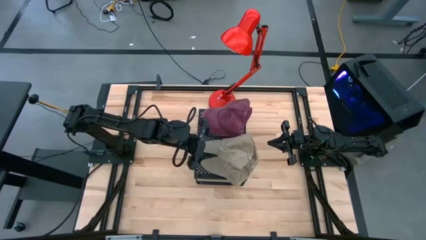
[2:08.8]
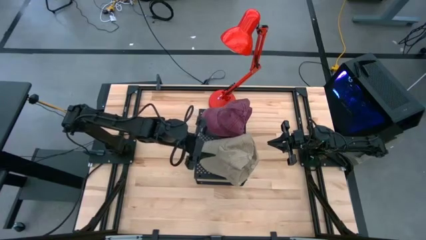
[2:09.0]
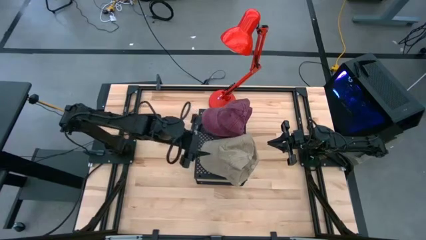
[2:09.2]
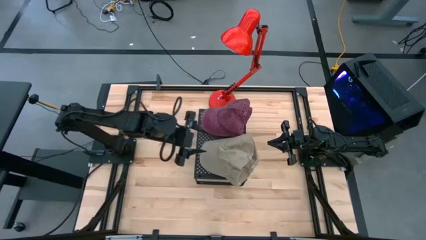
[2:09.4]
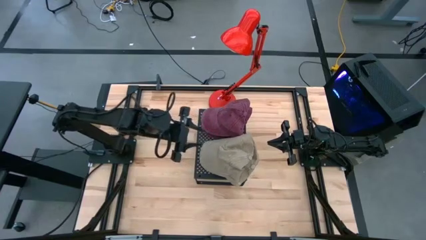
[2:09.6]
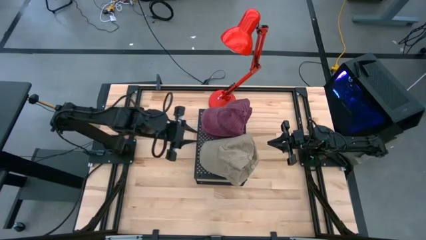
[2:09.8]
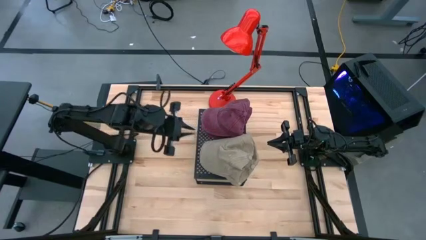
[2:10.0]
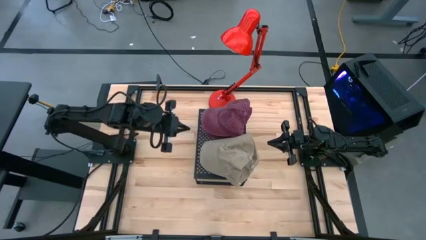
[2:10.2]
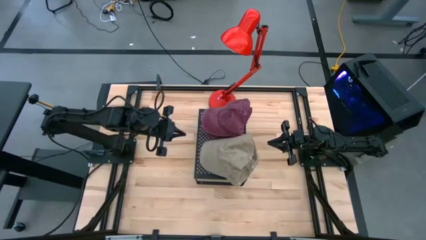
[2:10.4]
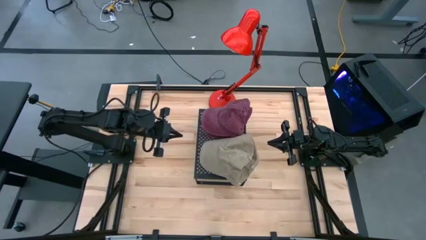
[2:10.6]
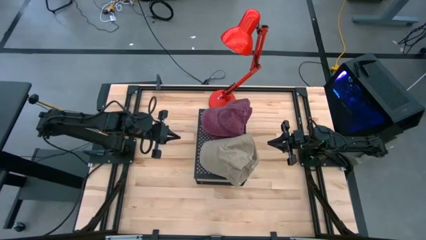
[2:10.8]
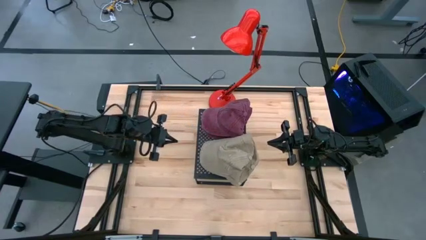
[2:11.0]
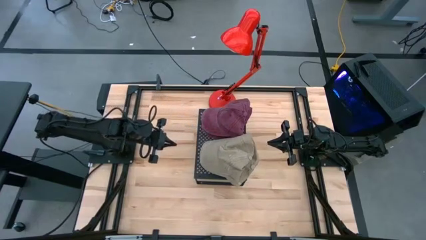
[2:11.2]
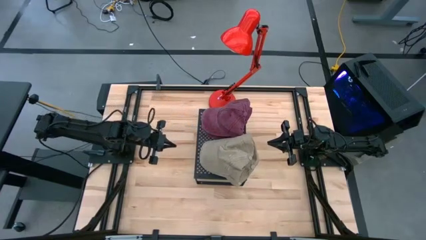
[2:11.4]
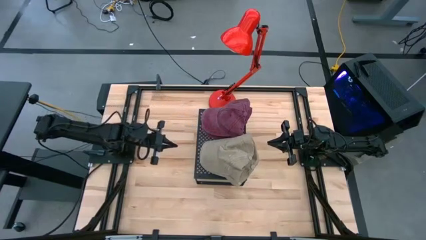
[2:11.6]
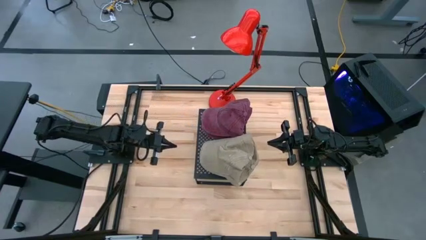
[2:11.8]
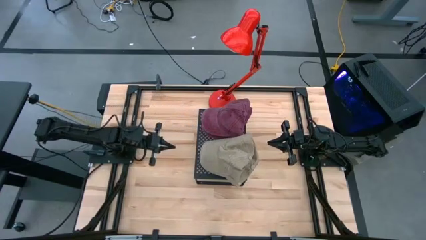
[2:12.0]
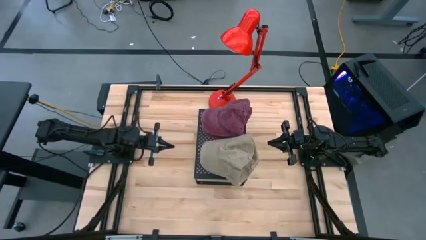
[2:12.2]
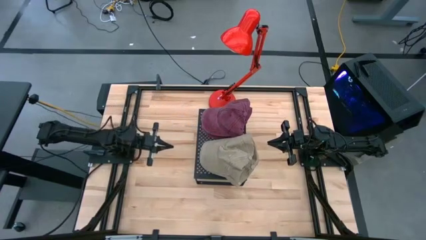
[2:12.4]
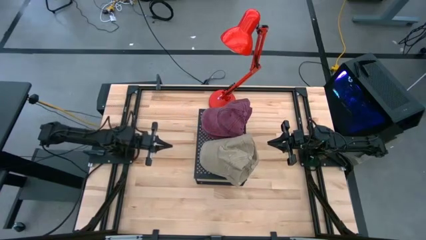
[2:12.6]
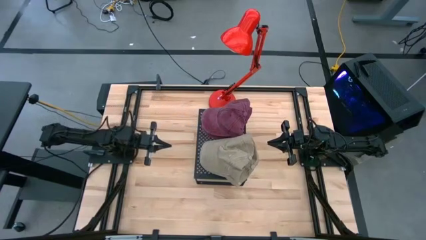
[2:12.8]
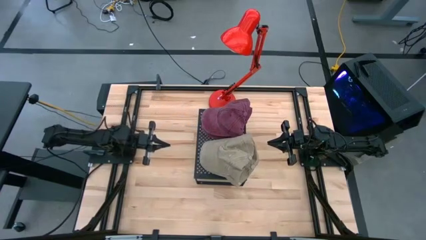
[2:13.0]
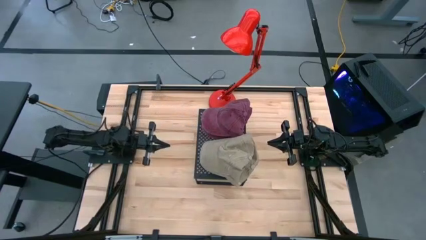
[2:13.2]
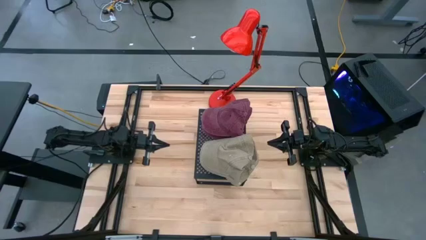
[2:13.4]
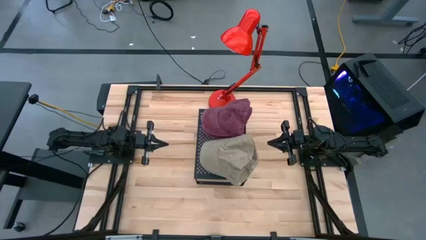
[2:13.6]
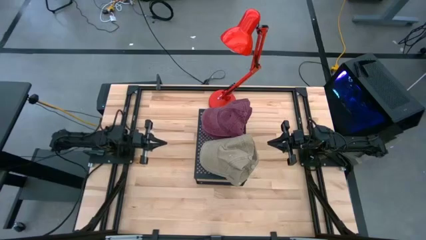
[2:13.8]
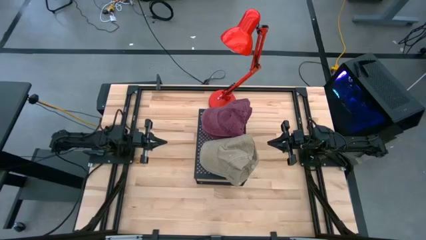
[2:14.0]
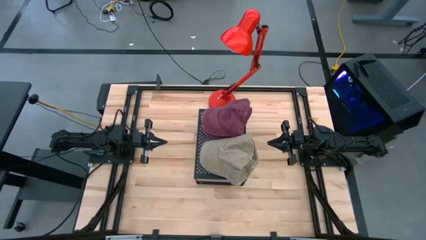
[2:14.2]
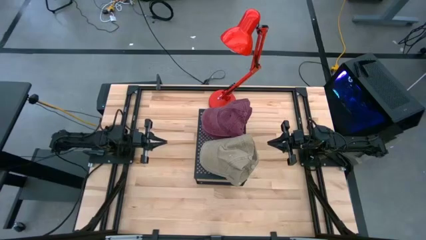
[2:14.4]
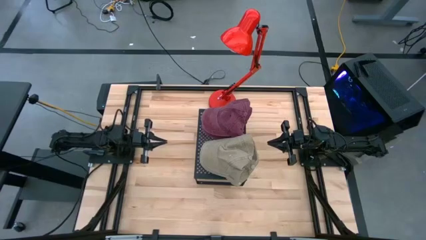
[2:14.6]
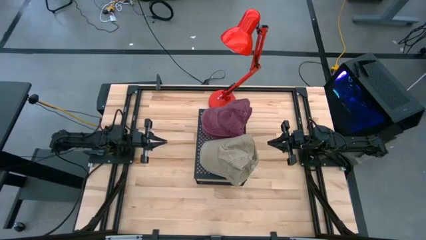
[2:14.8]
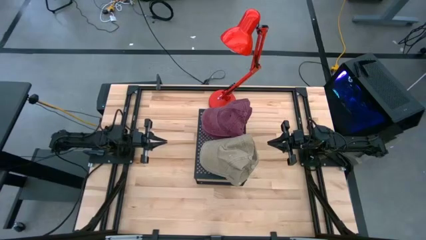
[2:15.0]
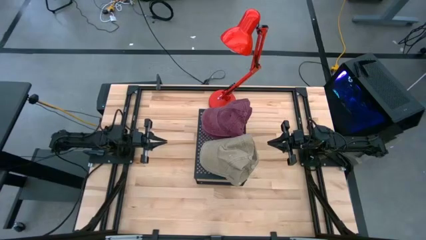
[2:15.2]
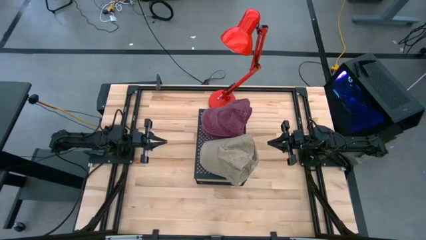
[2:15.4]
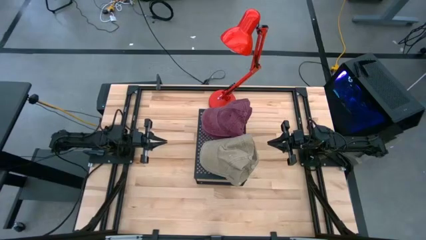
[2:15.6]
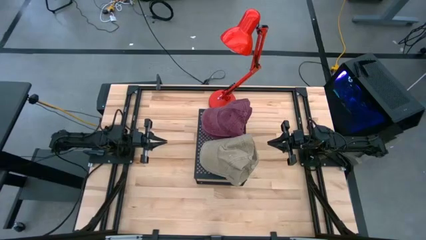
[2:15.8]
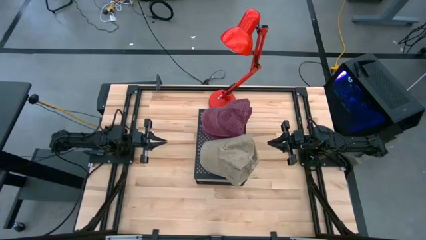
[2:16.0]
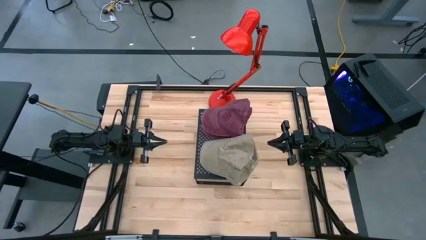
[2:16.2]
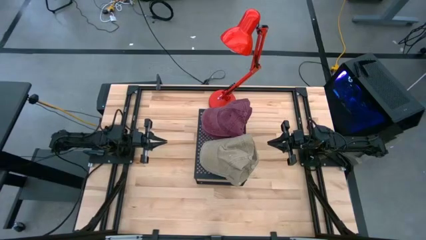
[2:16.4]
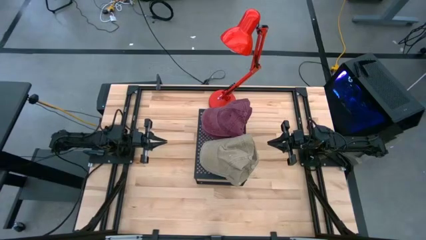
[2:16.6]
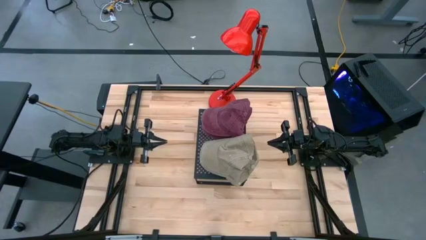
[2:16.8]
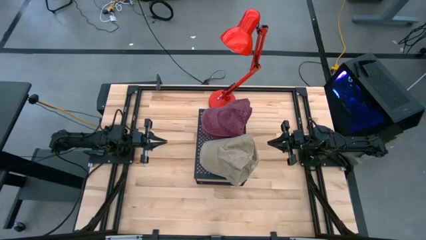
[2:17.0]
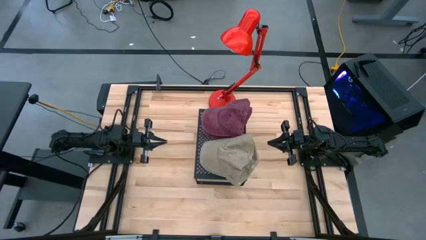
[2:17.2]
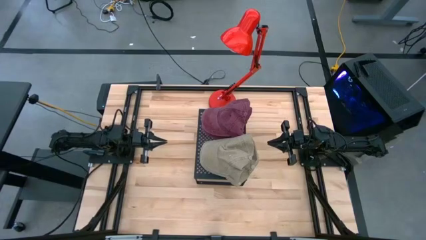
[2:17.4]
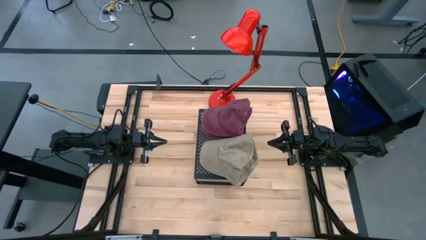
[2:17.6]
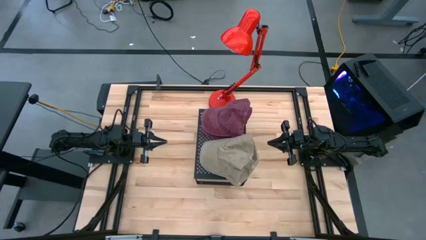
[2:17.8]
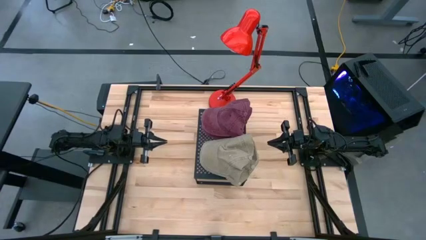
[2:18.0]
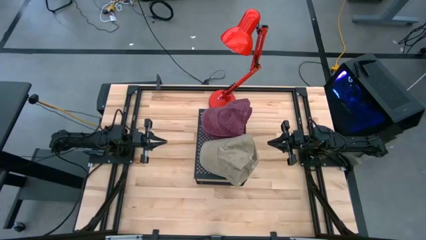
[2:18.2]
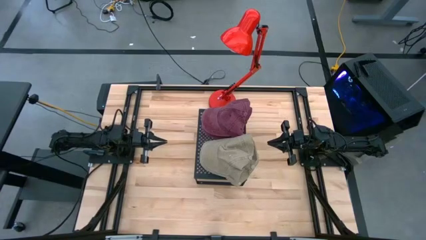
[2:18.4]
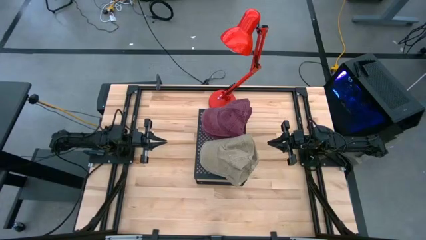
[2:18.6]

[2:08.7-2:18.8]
Task: Pick & Place hat
Return to Home Position

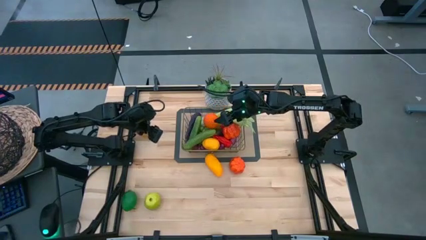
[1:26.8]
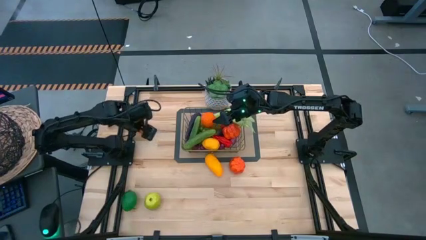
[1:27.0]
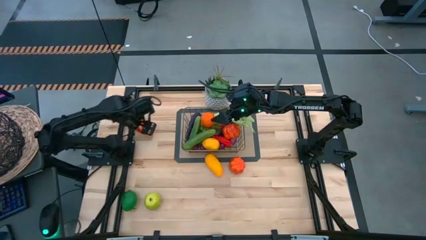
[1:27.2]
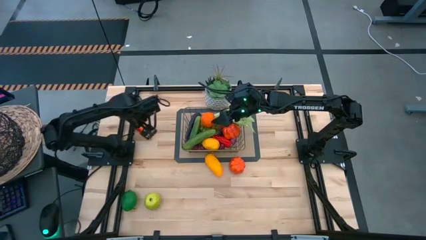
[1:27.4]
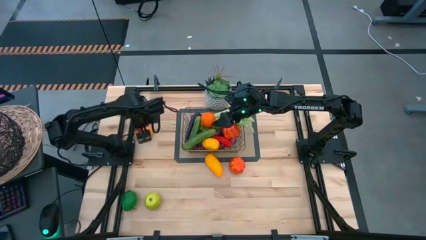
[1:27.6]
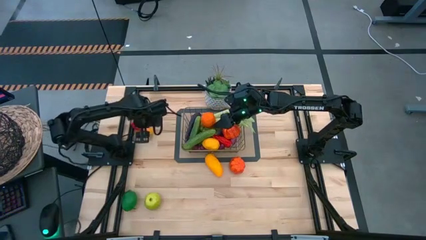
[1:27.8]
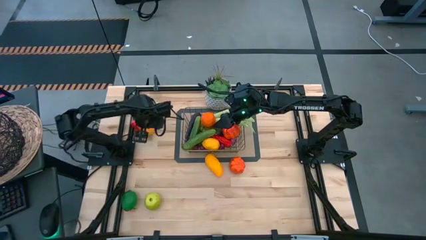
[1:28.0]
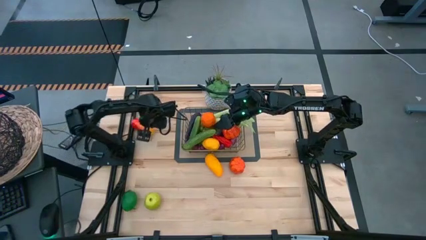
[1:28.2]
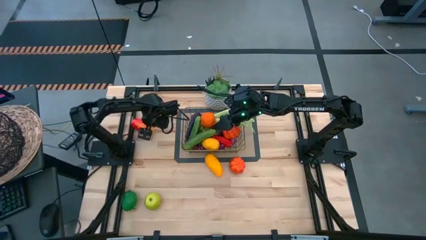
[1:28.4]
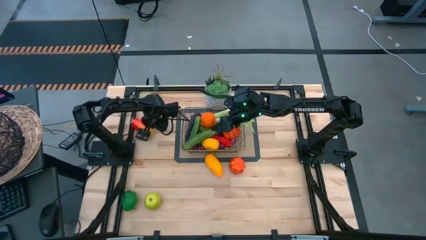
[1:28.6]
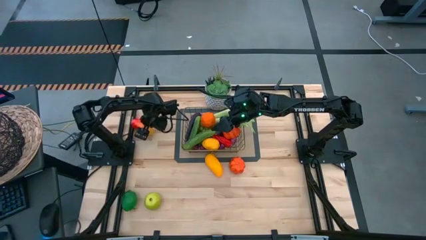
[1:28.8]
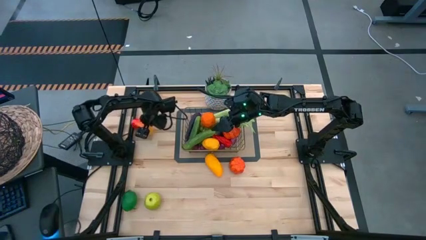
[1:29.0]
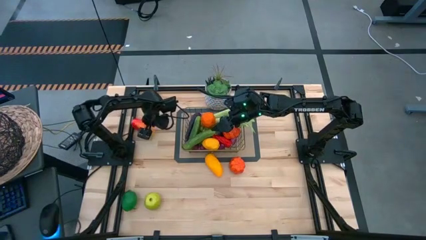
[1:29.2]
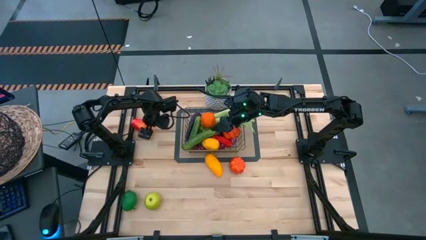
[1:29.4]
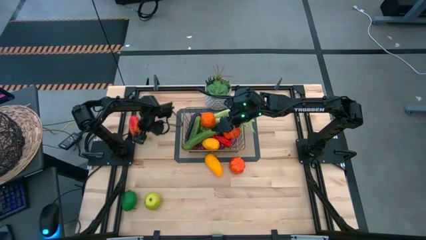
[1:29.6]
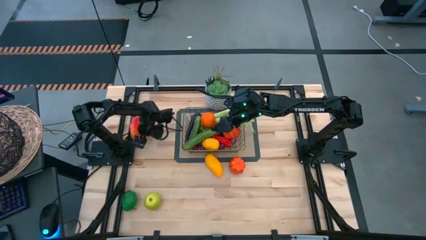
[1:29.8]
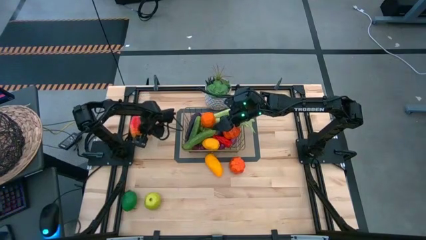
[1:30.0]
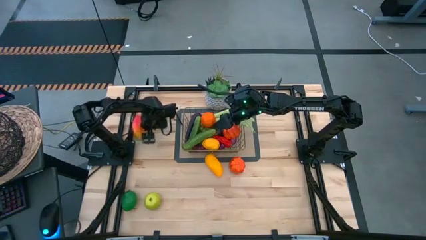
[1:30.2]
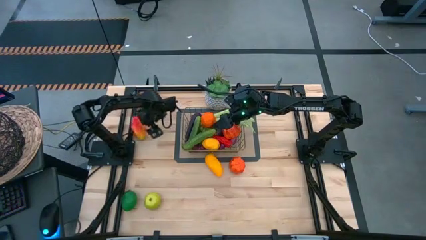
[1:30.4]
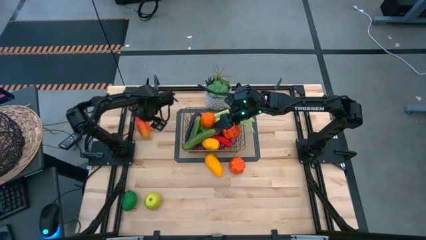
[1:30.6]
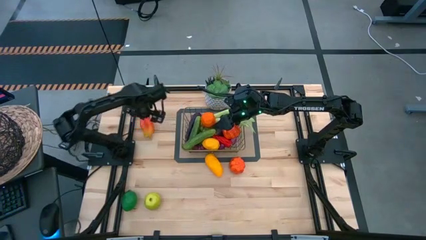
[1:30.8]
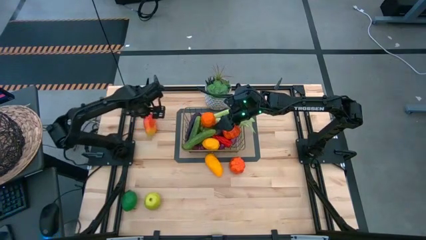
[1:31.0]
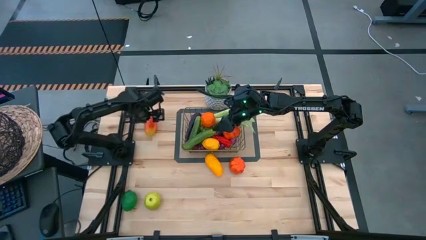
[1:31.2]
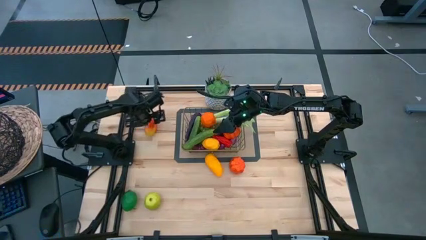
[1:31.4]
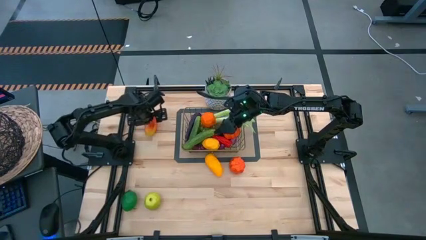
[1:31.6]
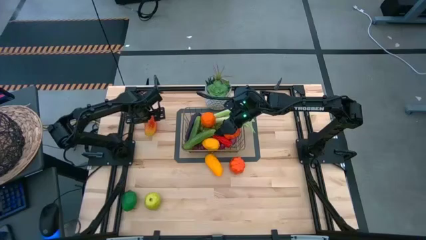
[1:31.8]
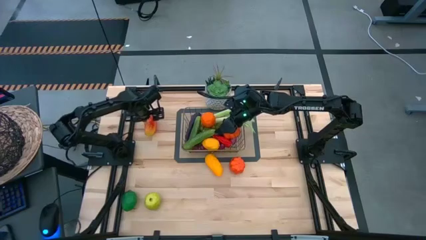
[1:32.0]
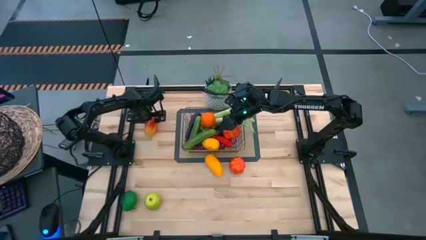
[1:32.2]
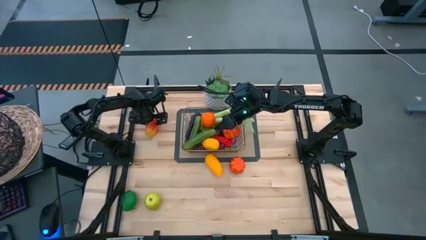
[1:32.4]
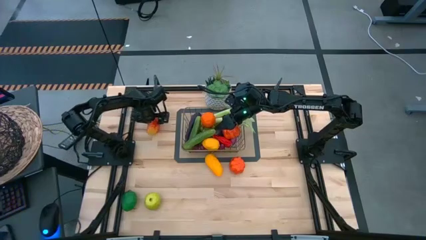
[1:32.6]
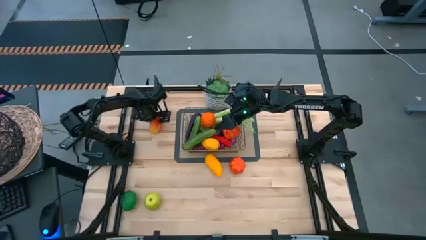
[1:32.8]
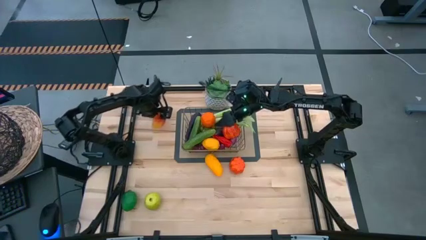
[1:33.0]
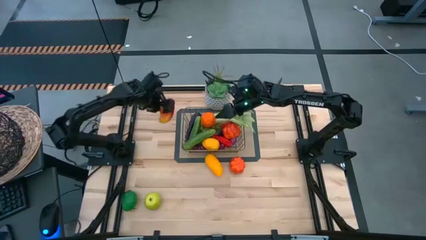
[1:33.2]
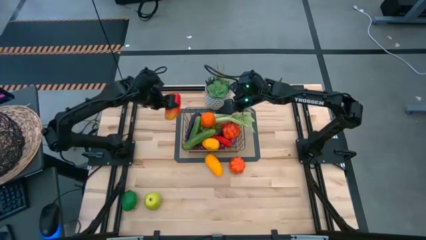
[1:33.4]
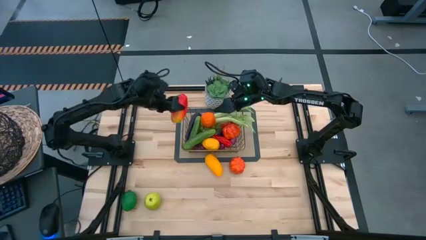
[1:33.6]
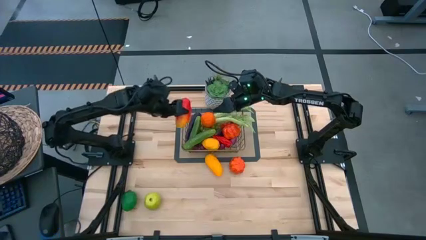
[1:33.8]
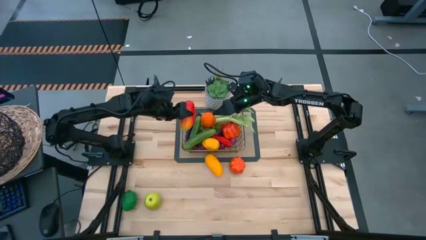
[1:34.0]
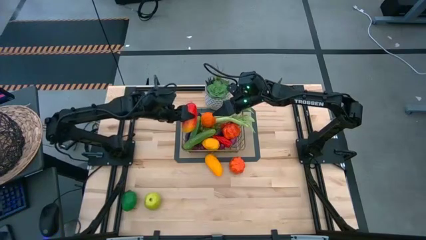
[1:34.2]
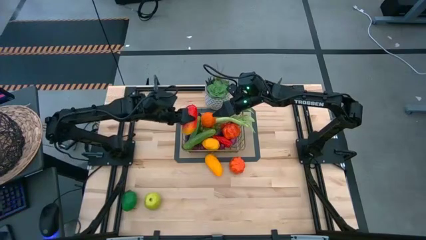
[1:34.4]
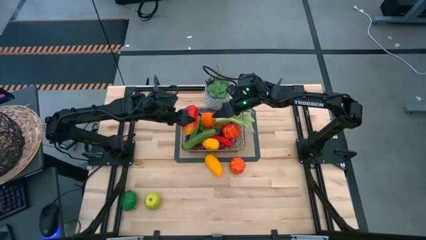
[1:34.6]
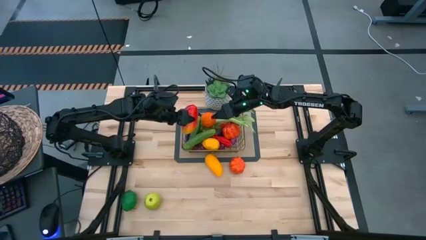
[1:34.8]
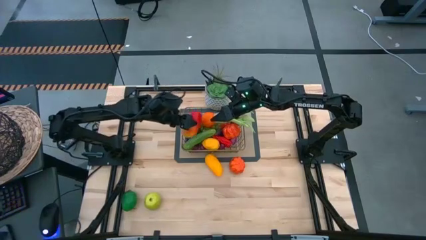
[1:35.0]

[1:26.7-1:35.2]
Task: Build produce basket
Put the red mango into the wire basket
